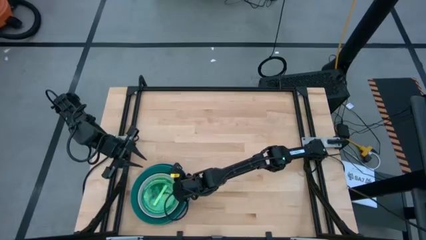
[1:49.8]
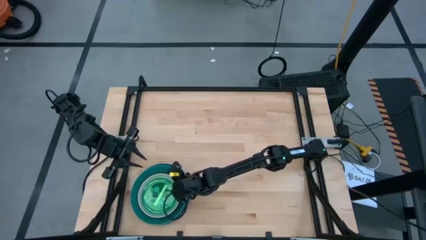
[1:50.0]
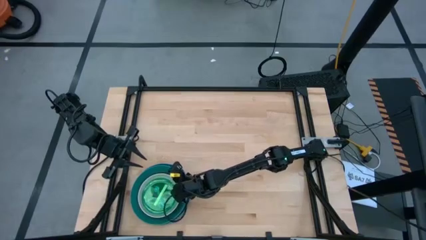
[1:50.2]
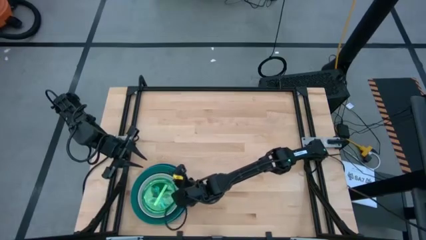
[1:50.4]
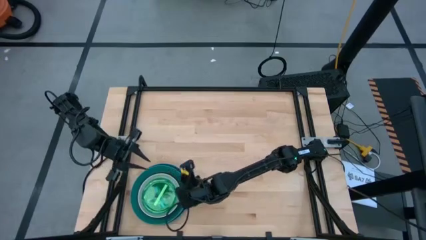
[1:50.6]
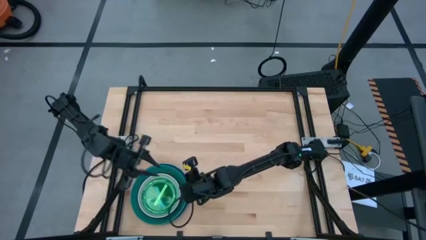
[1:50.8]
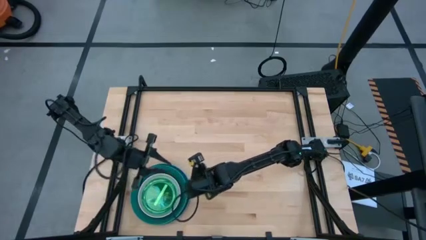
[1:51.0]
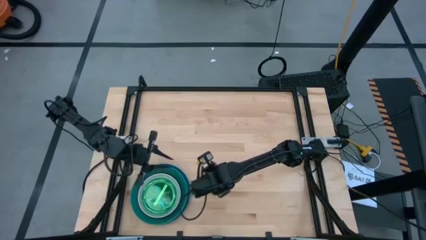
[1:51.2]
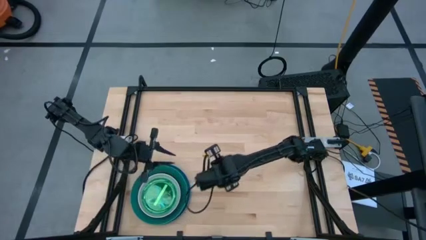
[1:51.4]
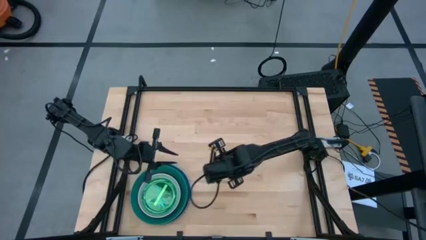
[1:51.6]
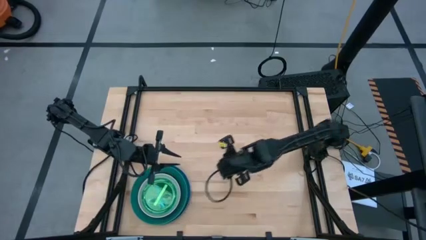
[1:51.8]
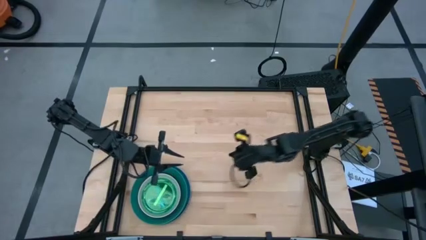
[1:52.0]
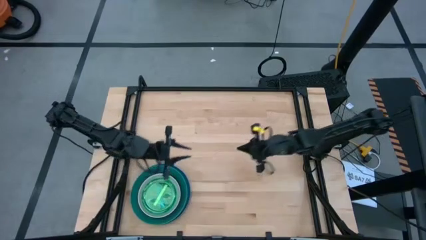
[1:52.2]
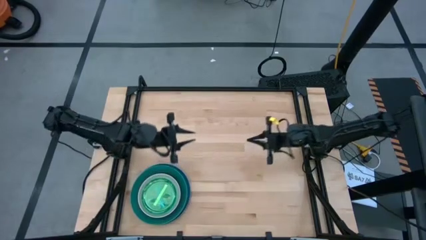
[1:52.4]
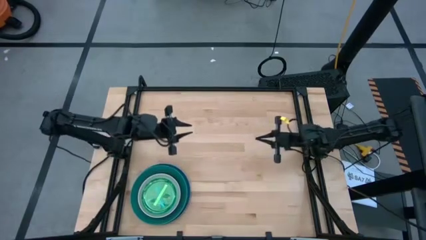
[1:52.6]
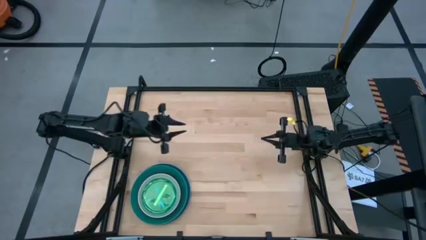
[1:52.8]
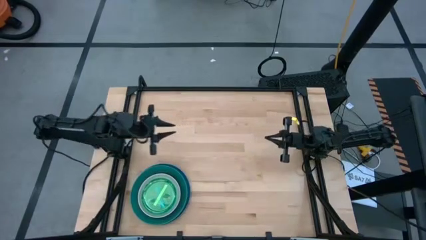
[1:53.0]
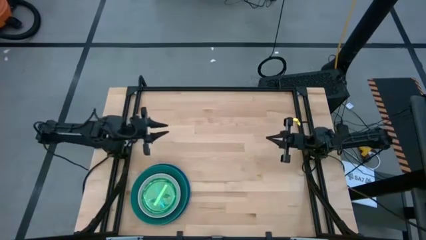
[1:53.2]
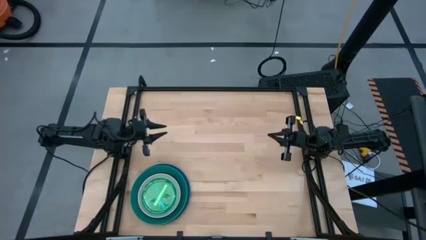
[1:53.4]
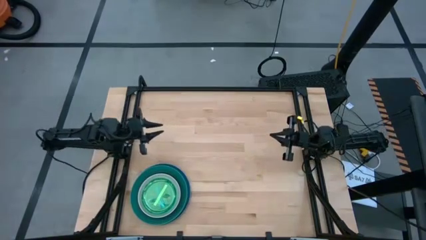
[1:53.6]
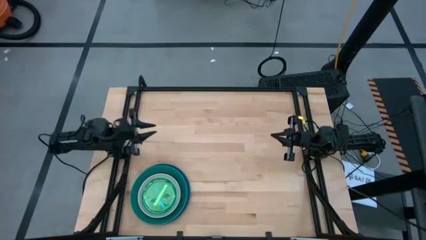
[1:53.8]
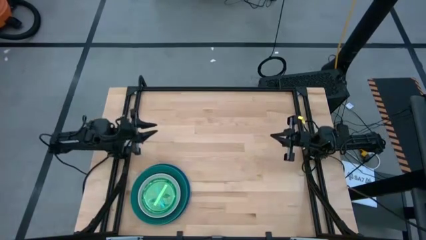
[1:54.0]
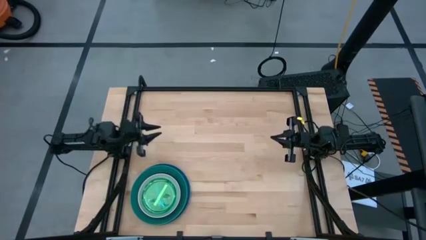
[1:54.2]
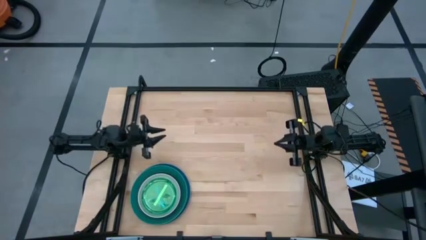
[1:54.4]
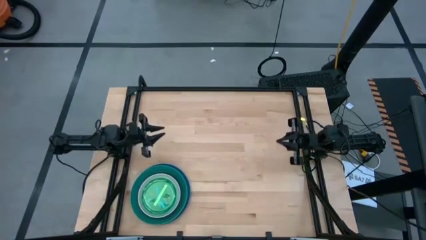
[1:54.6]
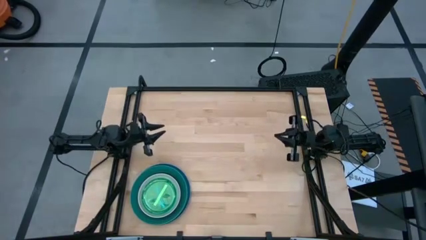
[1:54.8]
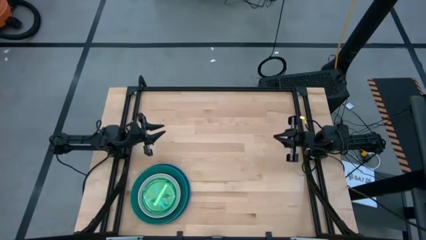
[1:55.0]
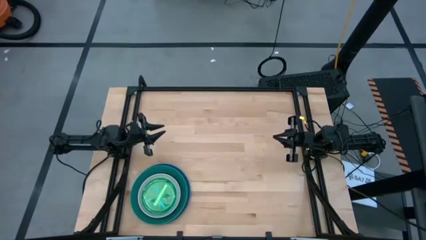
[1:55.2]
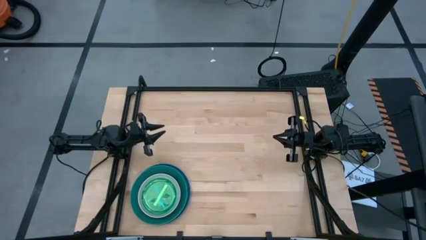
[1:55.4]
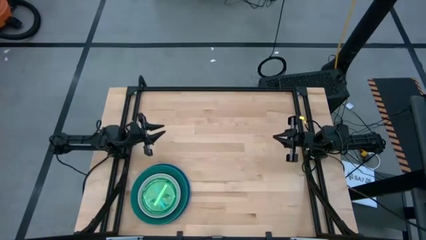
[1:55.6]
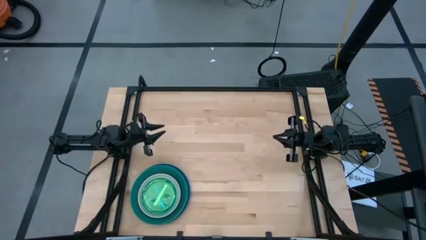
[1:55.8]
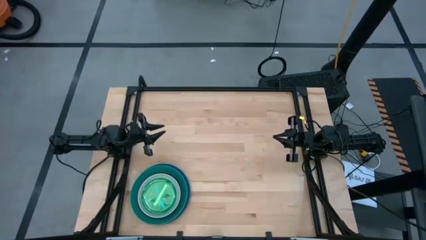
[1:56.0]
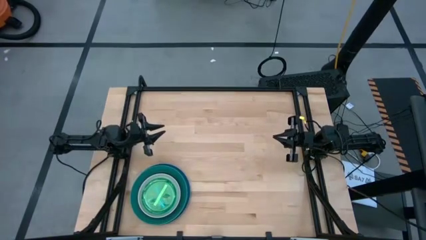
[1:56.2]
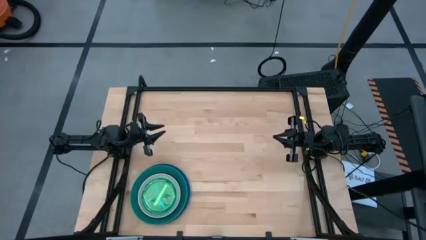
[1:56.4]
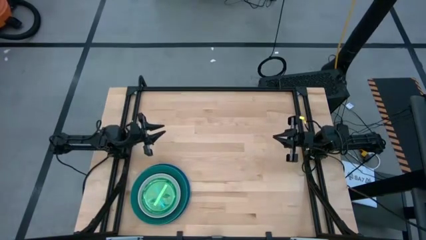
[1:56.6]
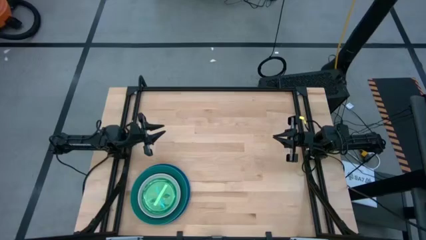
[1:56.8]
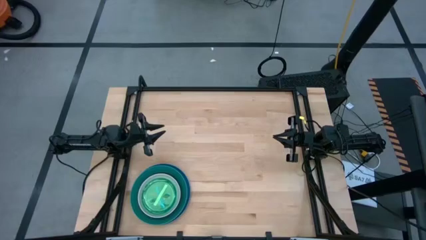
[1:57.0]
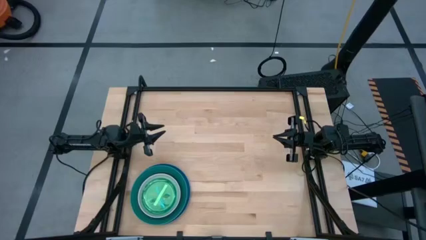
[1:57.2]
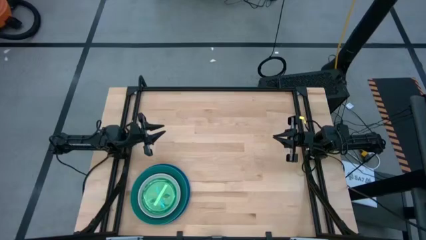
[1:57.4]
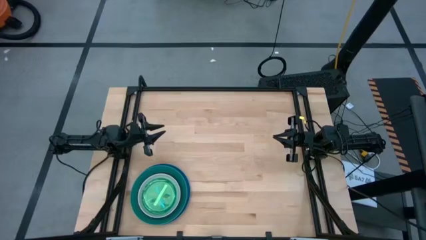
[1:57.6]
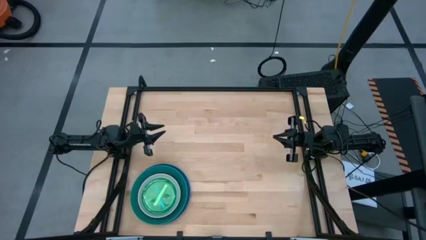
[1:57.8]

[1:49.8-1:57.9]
Task: Stack plastic plates
Return to Home Position

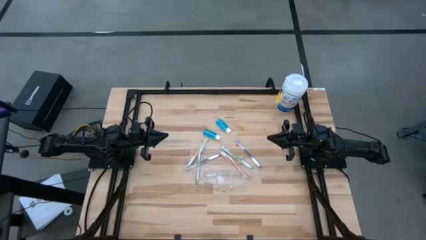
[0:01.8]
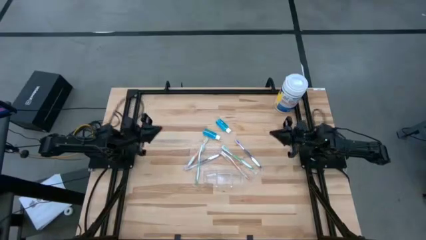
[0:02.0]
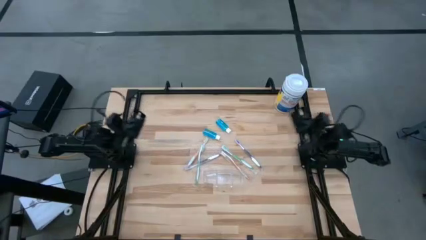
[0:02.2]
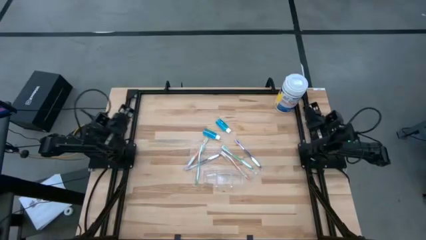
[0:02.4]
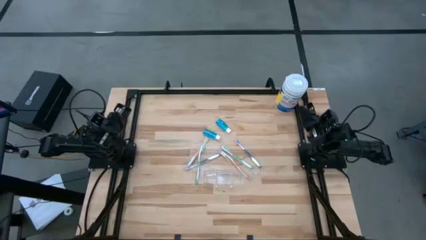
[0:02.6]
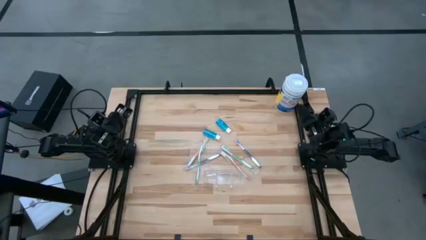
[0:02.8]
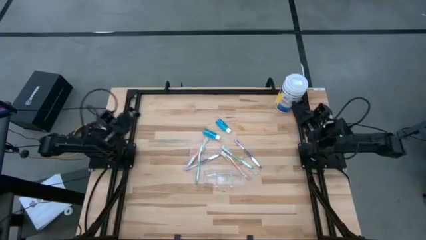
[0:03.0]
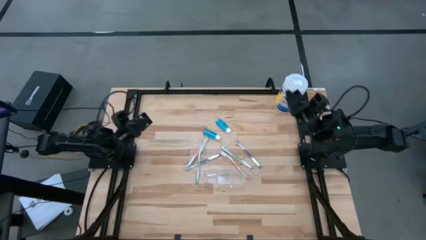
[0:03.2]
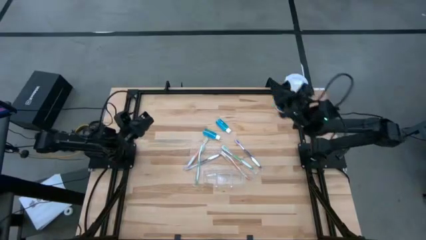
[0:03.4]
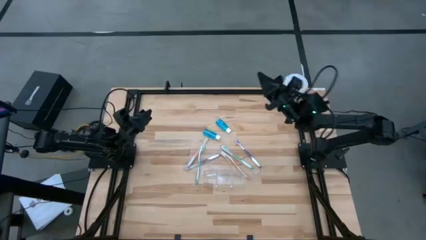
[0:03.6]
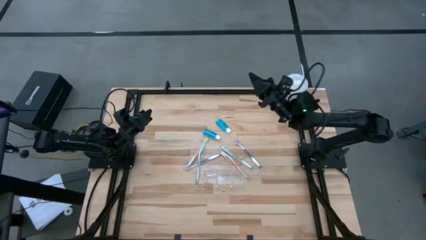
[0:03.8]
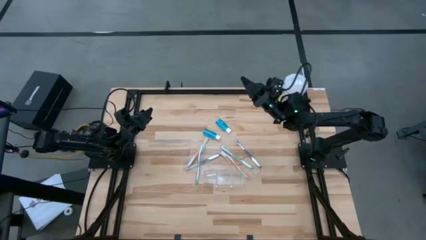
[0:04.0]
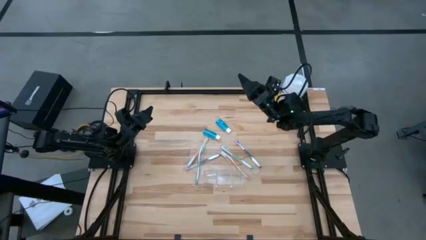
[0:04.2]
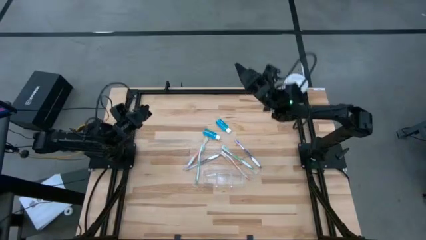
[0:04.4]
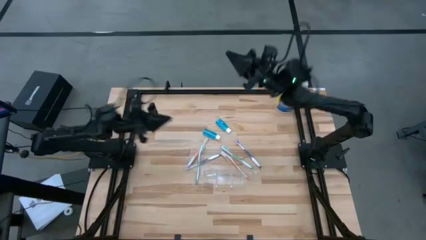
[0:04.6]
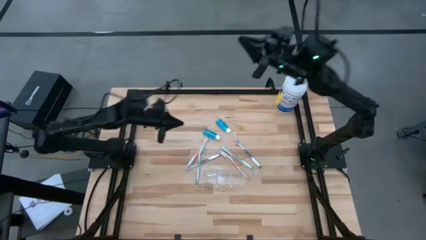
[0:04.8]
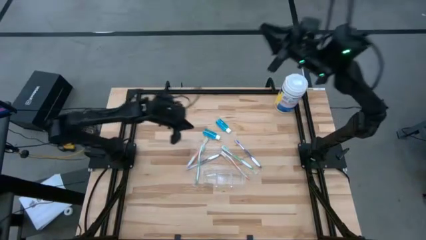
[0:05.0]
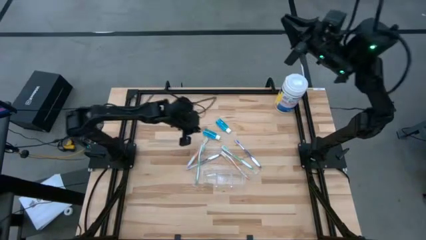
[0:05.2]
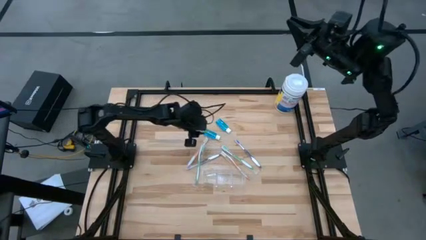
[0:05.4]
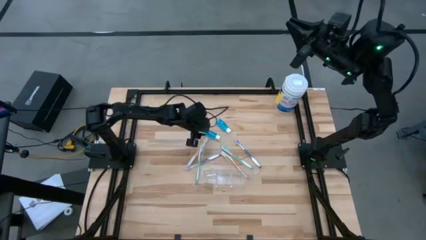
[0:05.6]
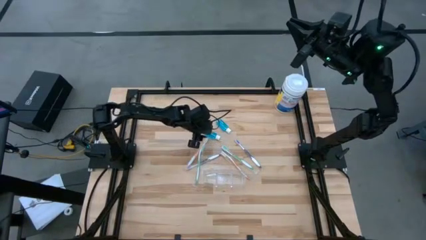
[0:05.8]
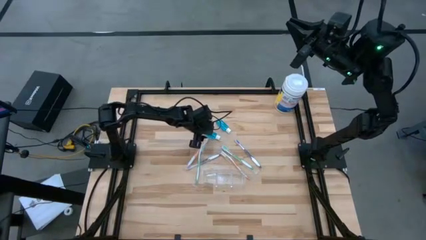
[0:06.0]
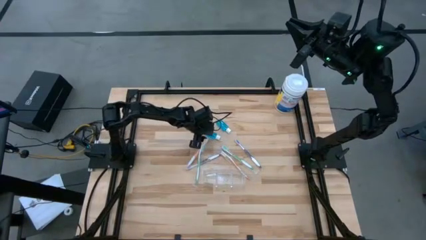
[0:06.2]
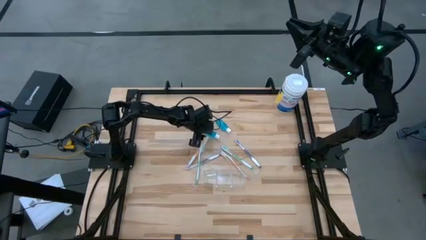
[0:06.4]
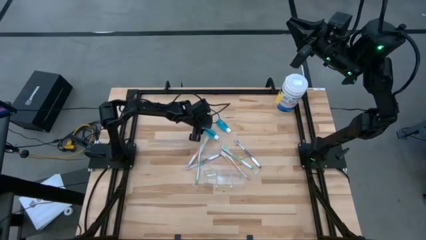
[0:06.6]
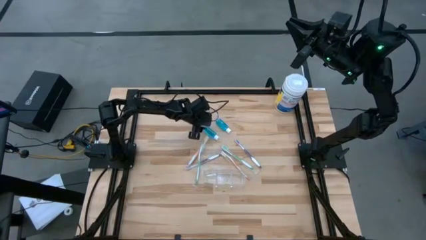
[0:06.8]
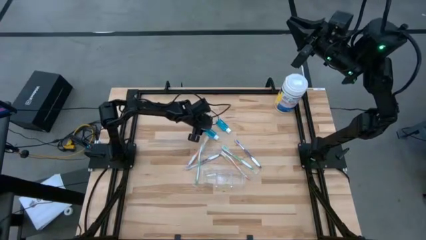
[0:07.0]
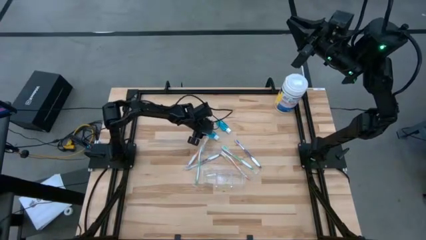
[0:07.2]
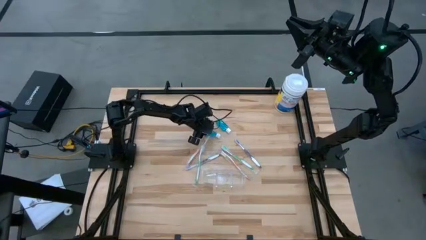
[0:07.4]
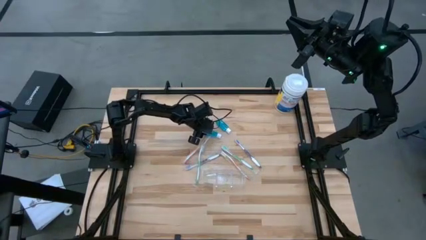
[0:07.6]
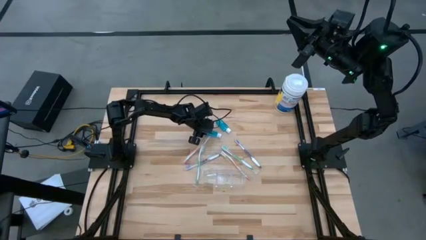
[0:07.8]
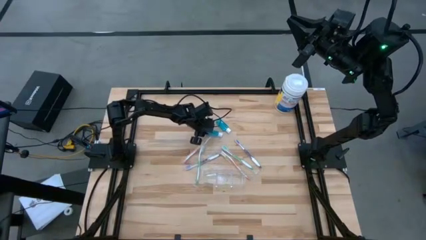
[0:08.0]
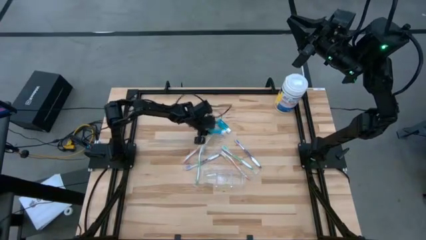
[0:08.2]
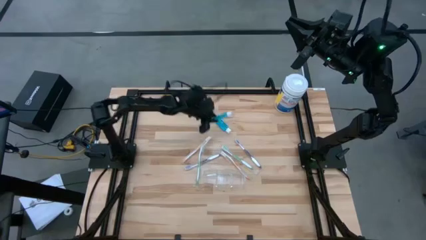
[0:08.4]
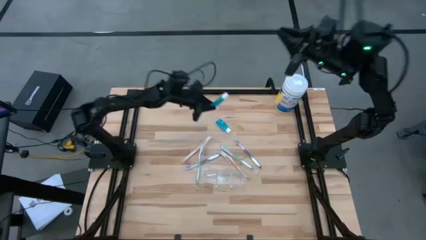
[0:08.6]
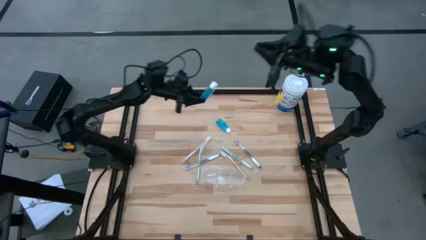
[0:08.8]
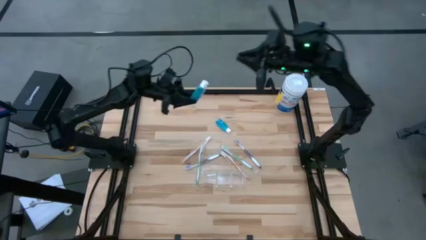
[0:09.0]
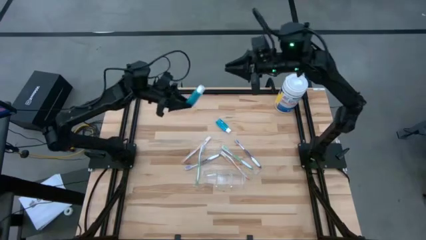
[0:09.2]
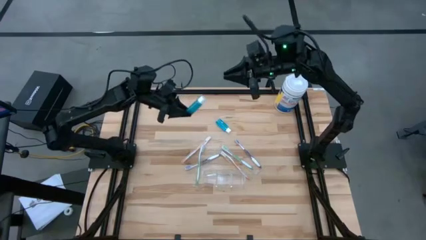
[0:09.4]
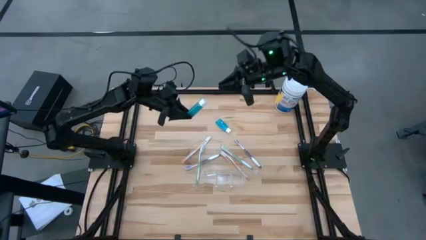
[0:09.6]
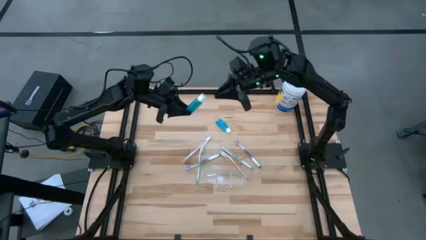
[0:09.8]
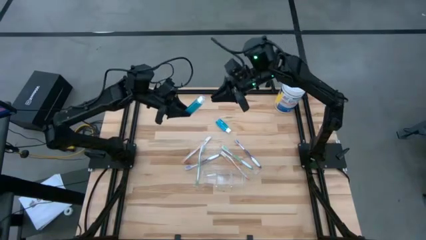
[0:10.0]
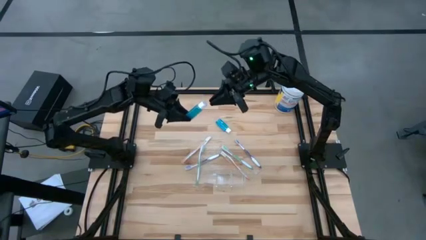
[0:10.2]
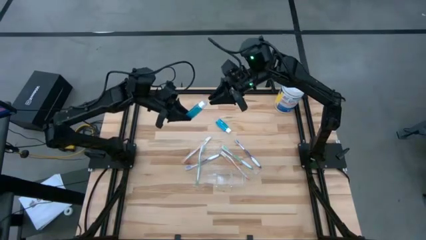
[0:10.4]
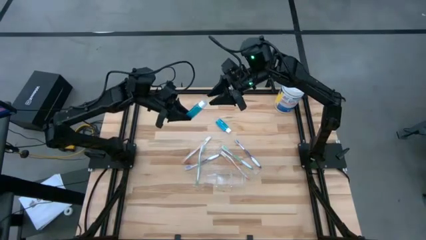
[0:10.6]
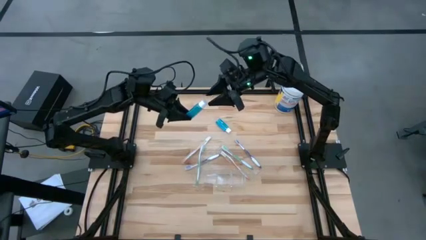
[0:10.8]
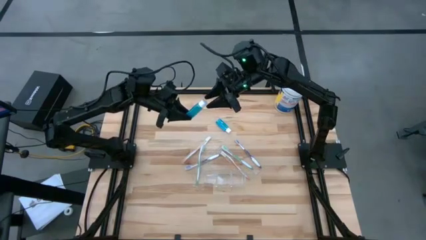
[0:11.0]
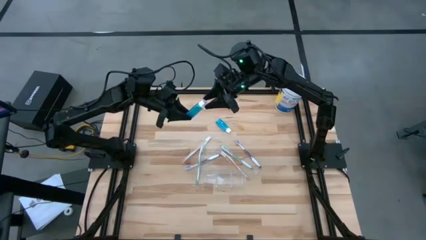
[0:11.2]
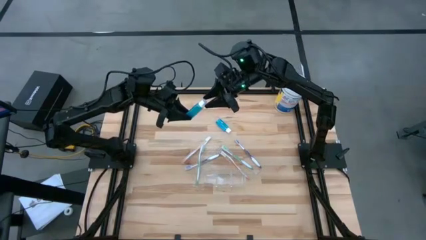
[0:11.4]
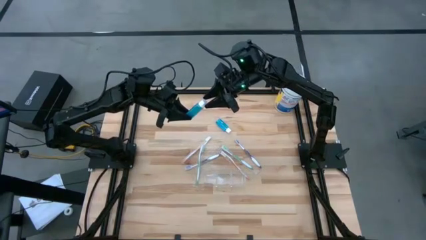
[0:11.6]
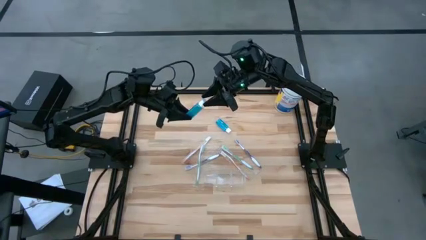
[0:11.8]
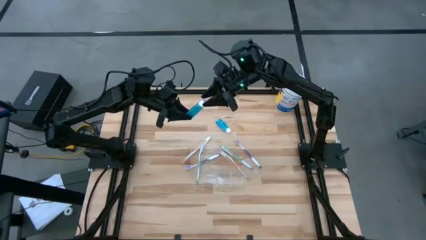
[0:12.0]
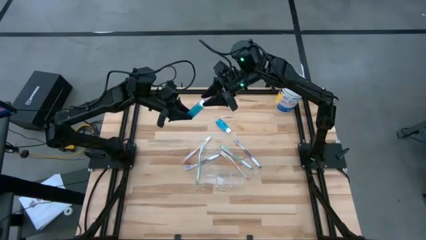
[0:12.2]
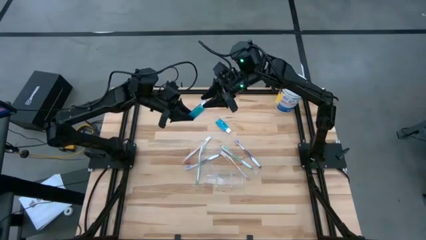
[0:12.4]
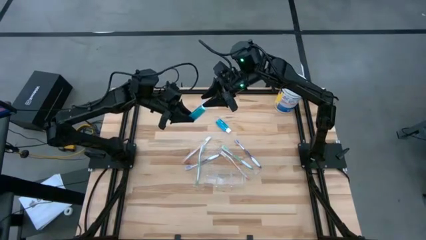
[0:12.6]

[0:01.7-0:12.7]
Task: Pick & Place toothbrushing station
Put the blue mouthwash into the transparent organizer
